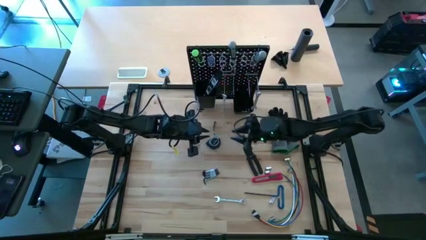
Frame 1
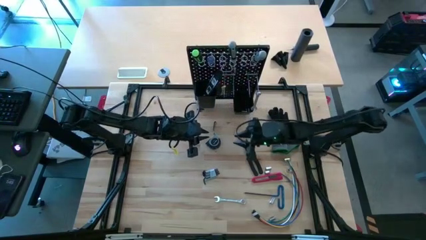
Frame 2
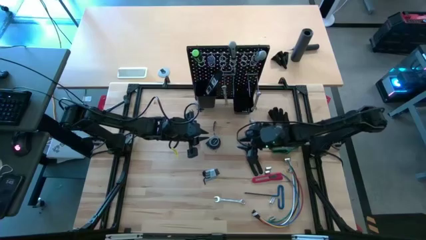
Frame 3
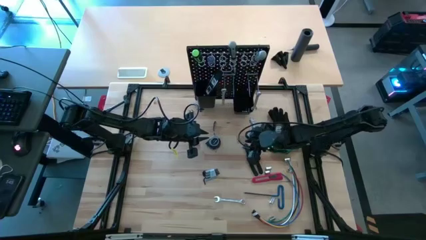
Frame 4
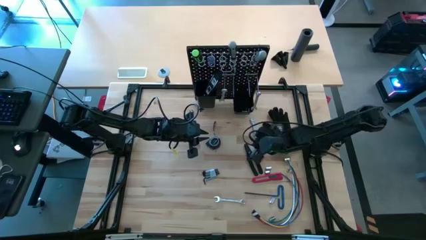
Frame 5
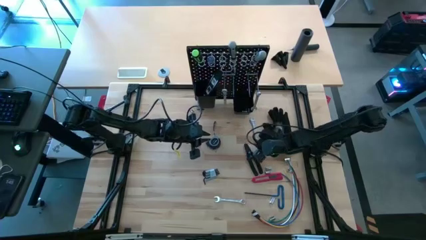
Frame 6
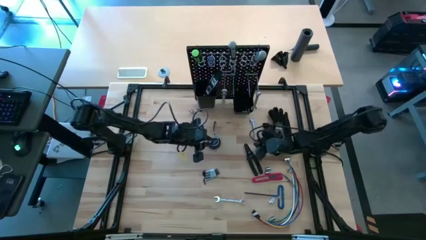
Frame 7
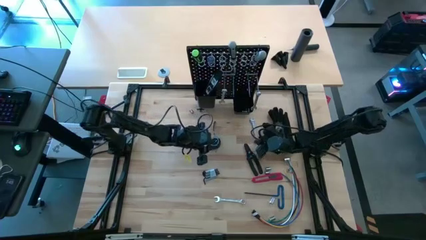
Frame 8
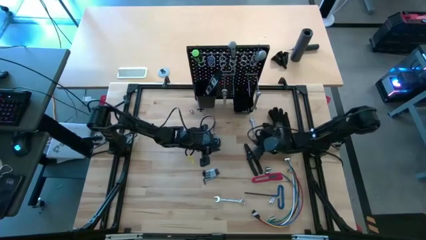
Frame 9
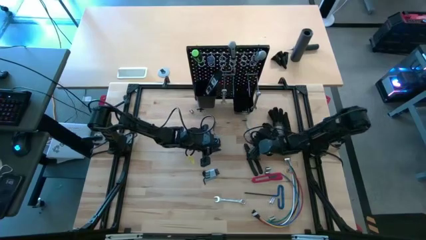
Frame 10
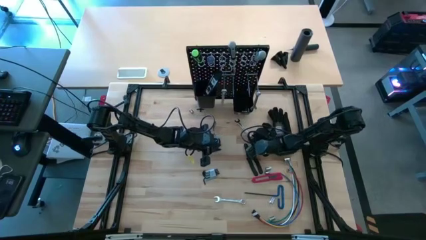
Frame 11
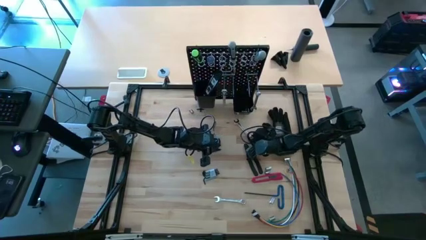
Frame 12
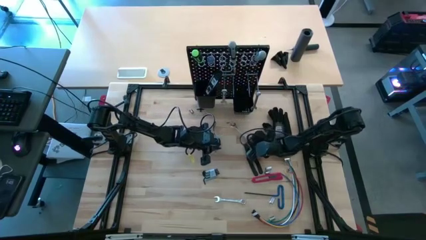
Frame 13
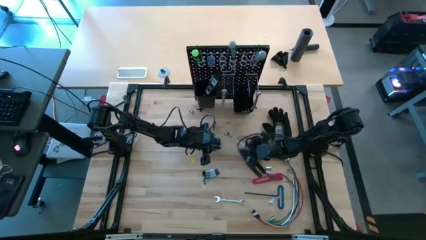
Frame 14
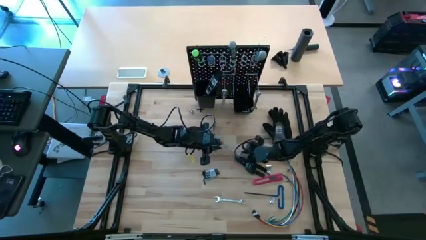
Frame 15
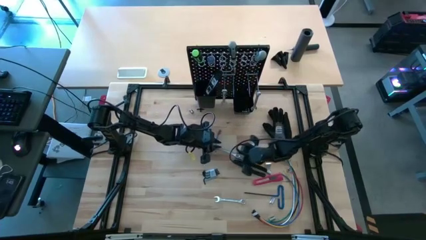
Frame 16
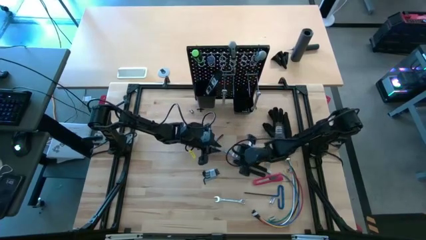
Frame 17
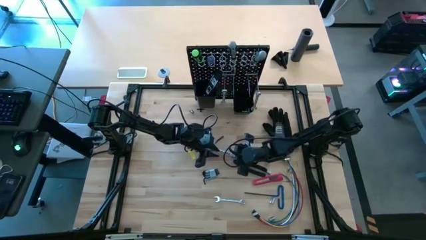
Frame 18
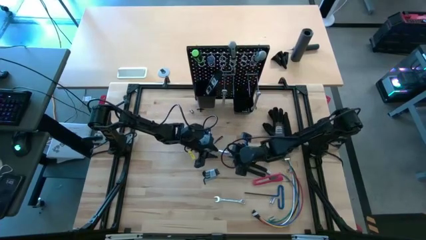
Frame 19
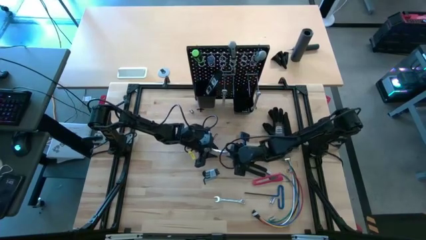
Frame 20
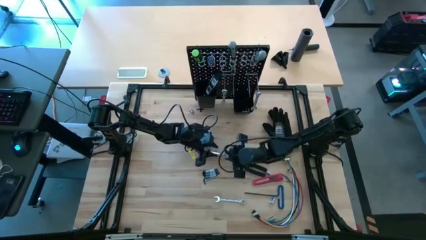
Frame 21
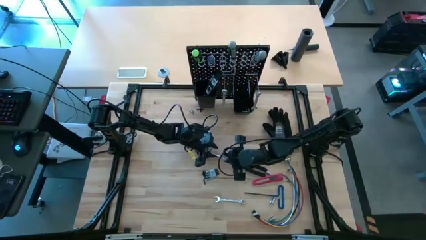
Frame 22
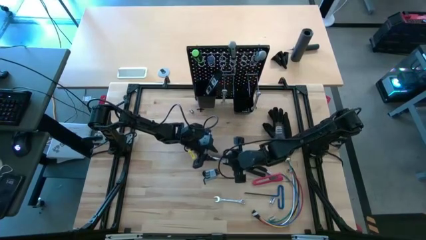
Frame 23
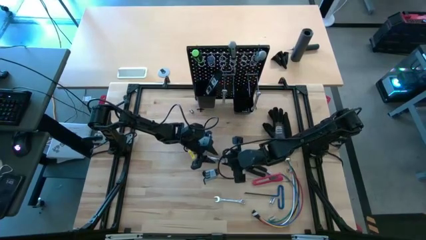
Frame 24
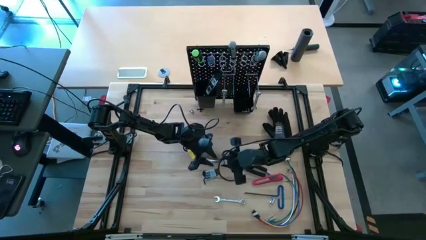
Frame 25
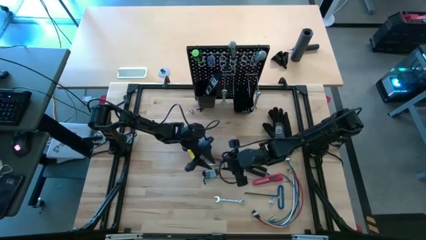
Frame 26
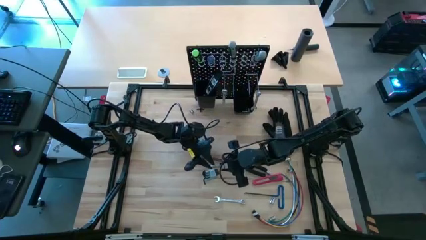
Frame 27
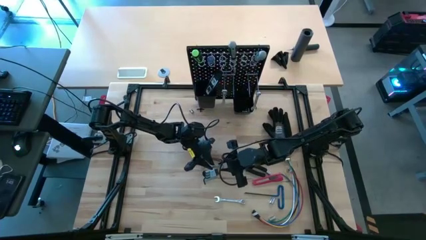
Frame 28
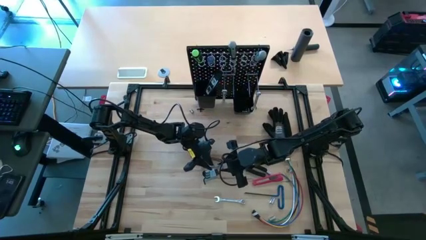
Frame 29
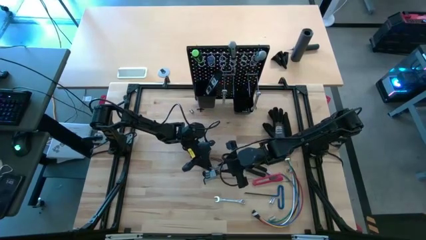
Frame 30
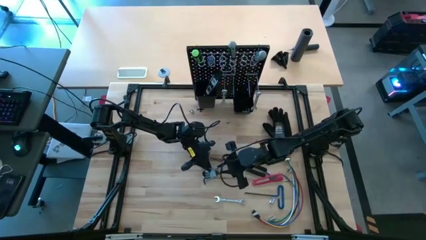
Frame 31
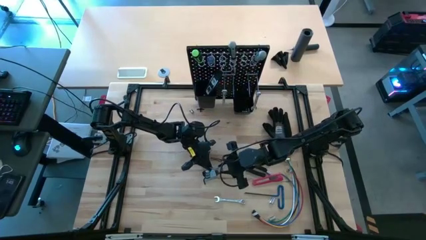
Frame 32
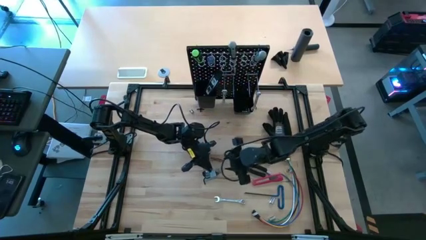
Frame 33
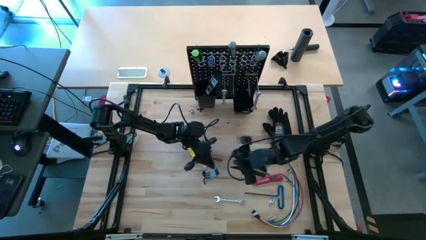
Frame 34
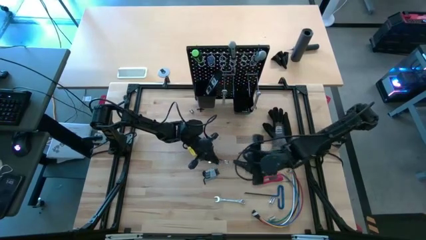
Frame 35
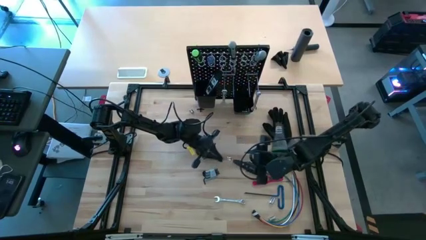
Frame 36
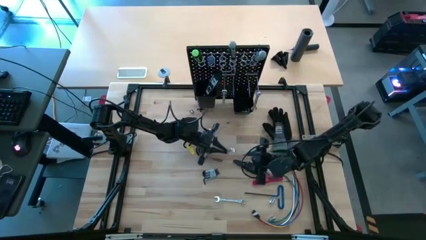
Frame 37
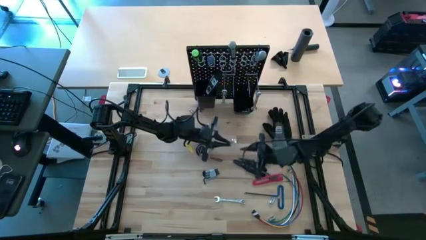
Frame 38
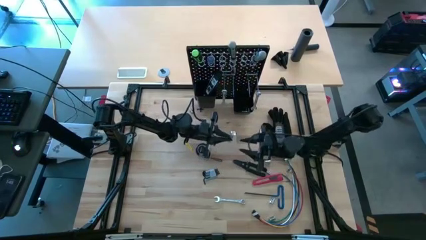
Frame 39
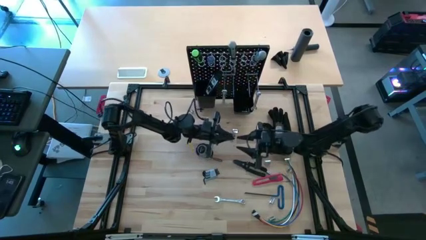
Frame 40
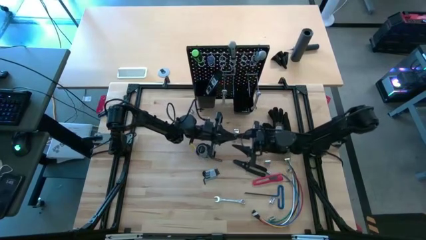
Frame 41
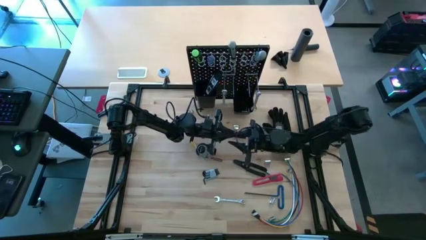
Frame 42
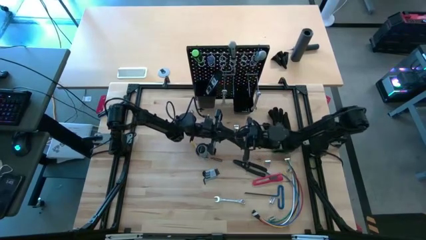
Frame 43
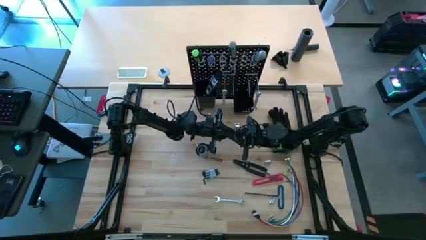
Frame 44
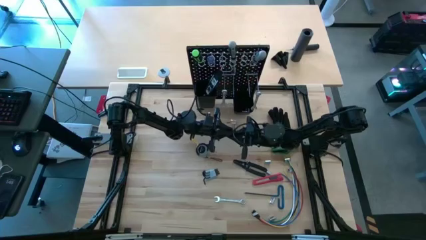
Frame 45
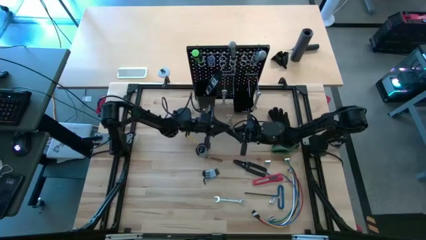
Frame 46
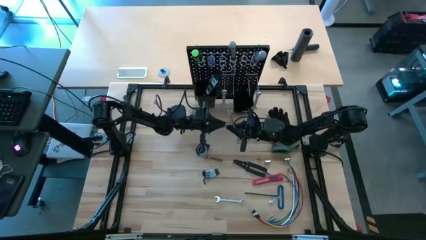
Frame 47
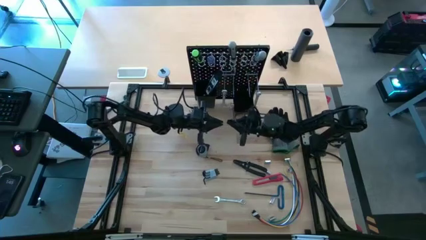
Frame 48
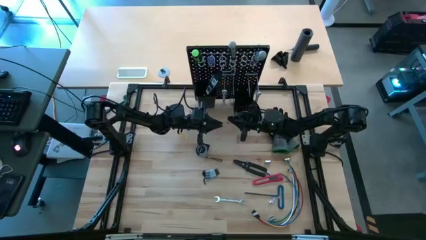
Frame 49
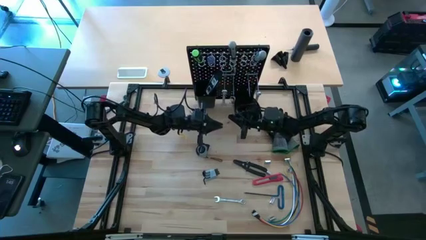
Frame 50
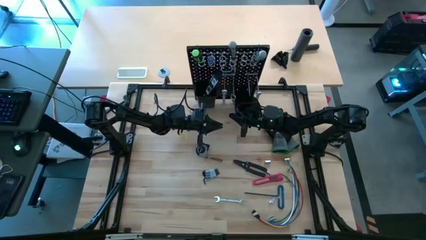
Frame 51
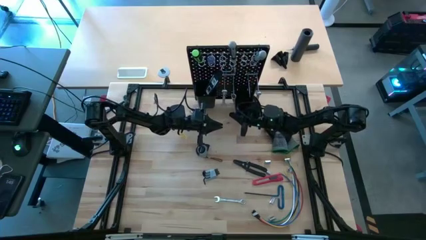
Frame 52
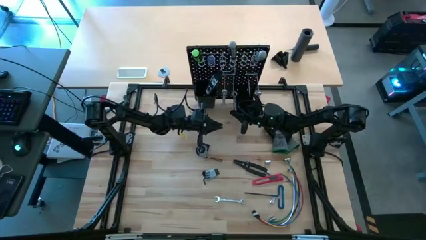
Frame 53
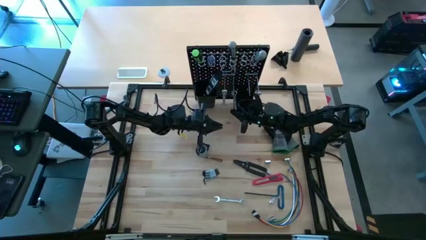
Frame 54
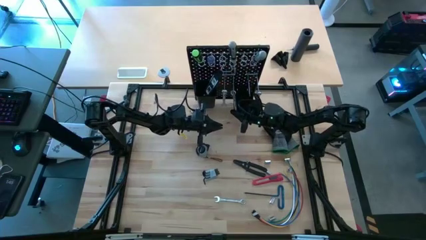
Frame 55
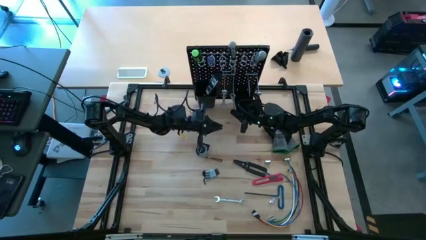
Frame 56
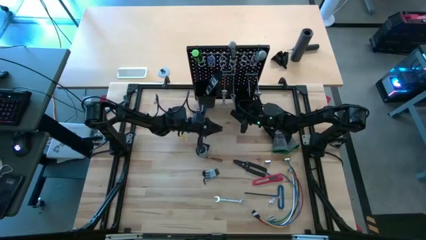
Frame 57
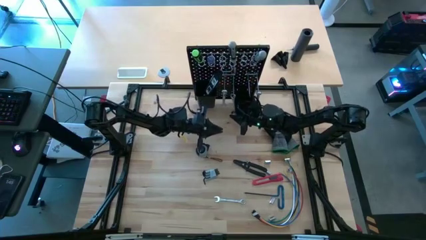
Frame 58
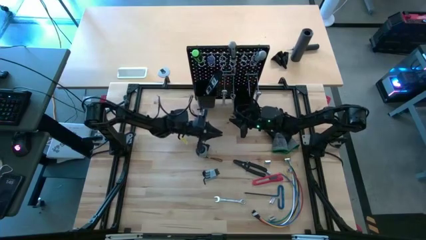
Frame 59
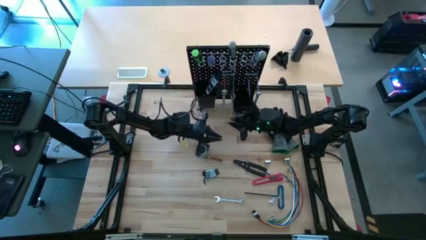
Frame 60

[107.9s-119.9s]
Task: Hang tools onto peg board
Hang the silver wrench on the peg board

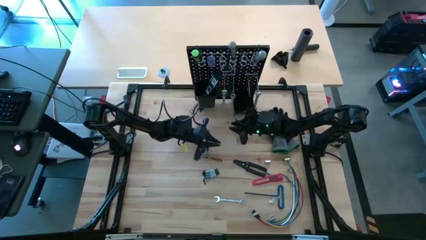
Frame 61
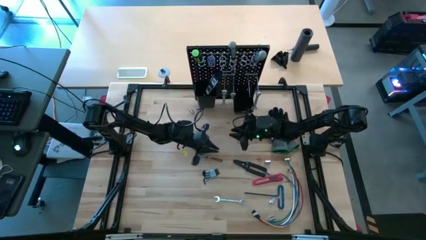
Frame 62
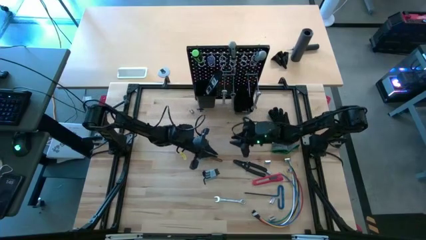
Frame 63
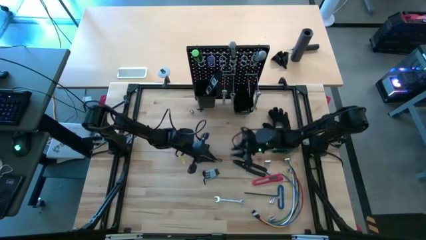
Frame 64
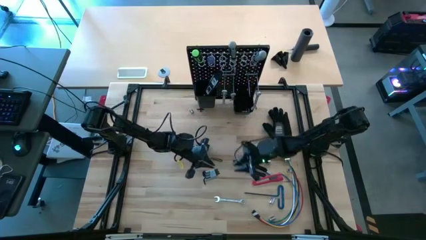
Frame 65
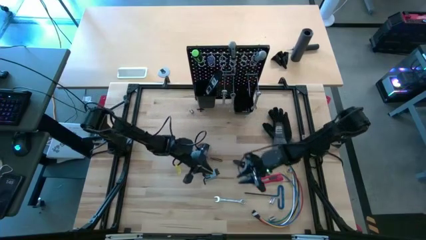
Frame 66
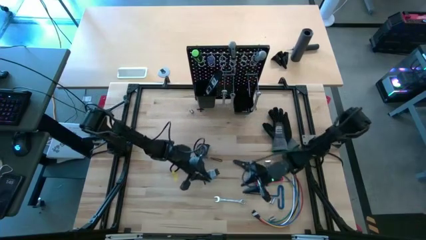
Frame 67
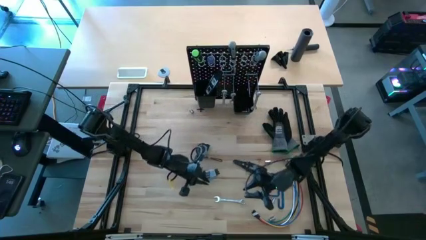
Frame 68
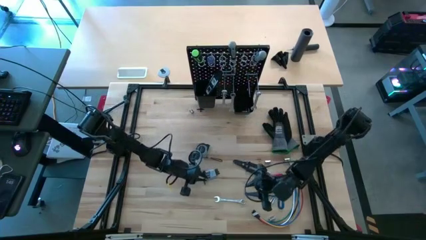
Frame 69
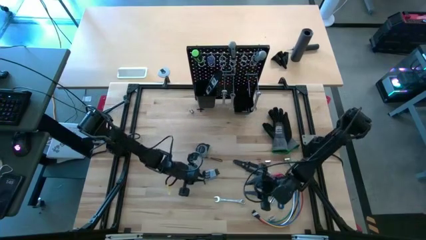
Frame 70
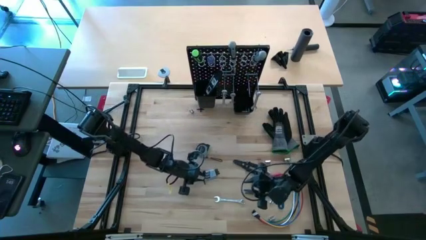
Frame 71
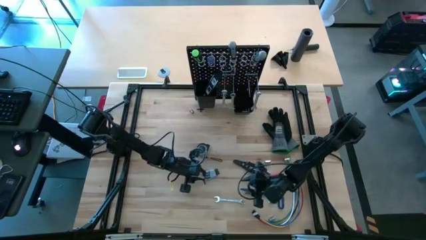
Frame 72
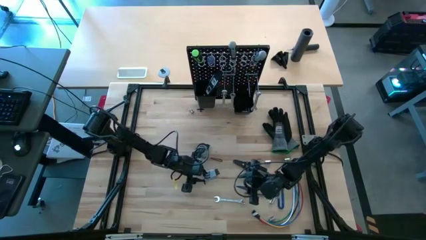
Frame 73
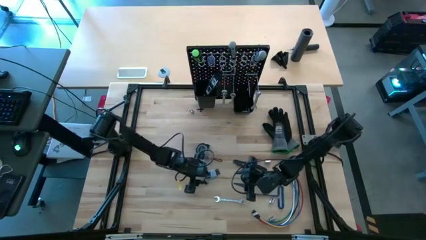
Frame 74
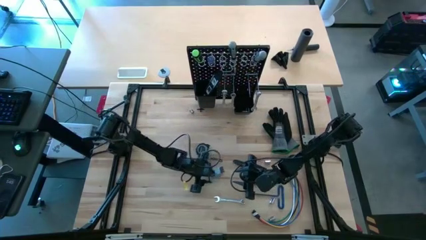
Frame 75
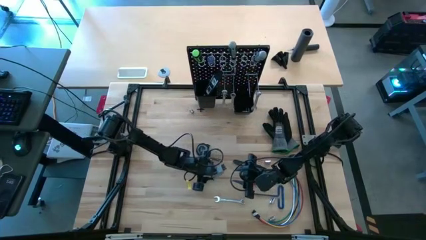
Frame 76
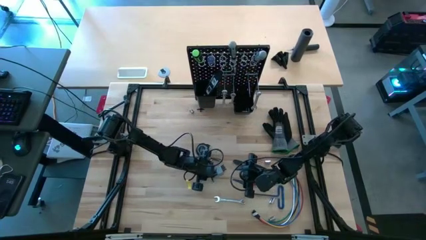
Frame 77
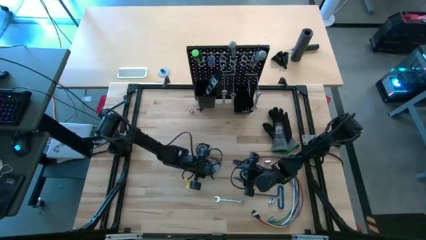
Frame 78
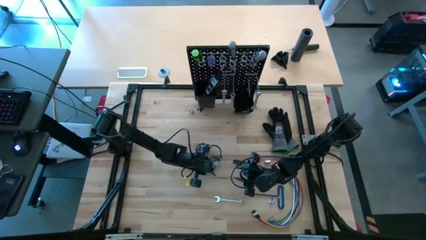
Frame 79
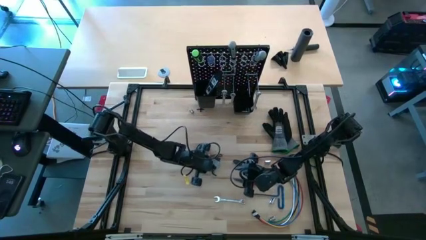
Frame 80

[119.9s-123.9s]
Put the gray hex keys on the right black bin on the peg board
